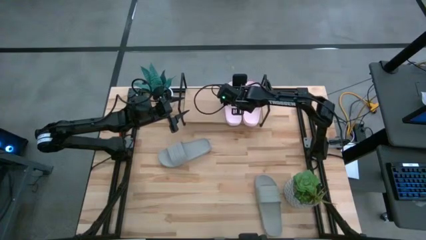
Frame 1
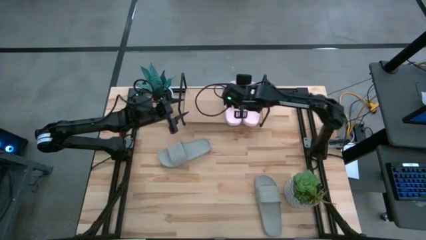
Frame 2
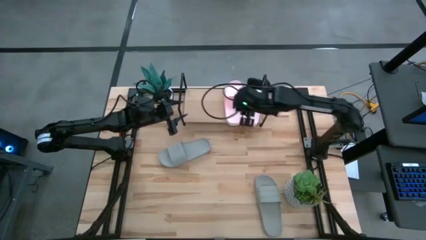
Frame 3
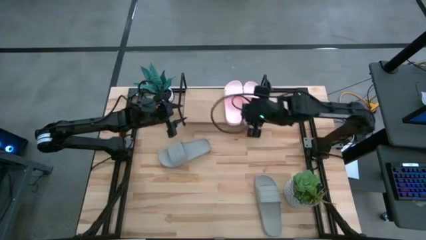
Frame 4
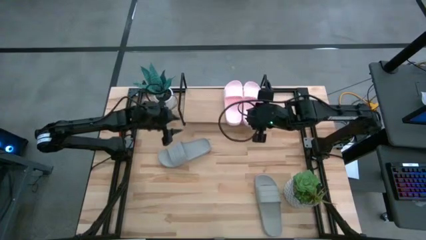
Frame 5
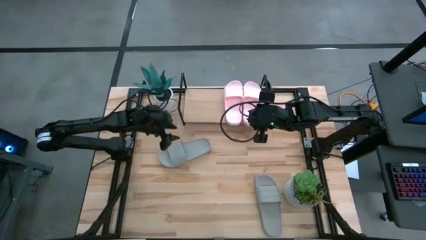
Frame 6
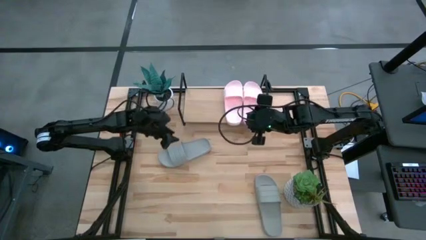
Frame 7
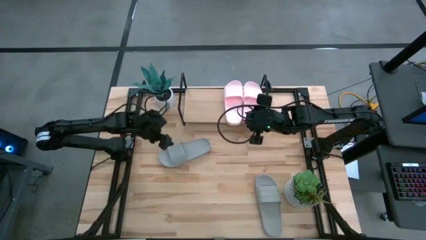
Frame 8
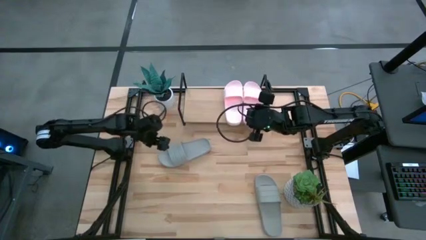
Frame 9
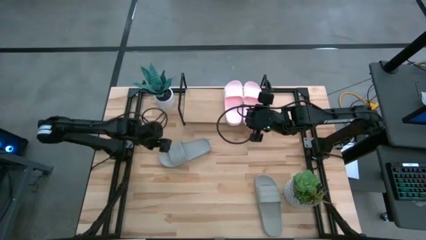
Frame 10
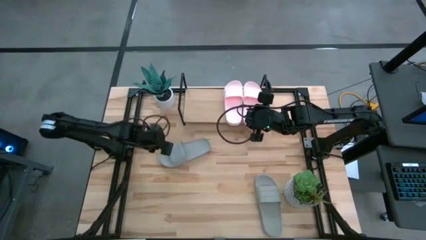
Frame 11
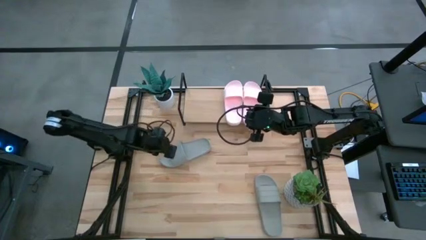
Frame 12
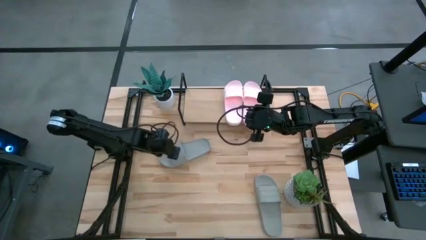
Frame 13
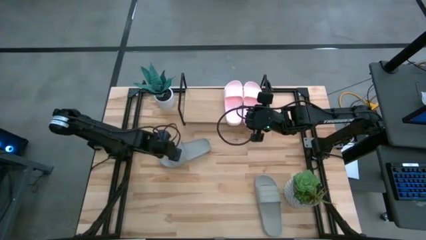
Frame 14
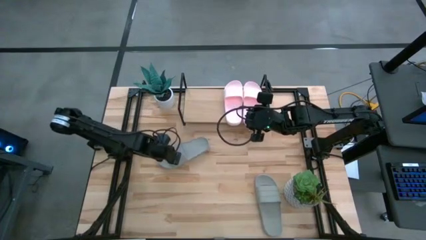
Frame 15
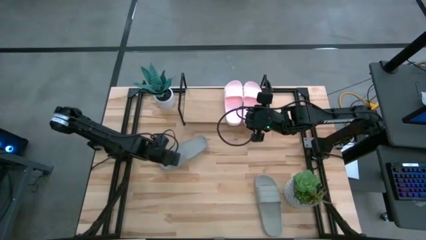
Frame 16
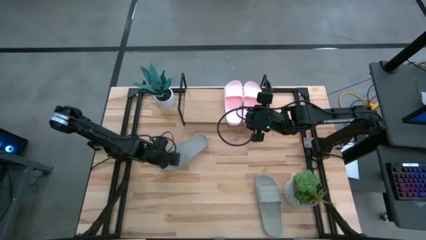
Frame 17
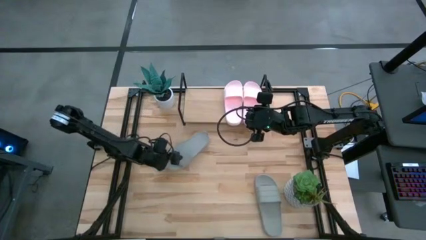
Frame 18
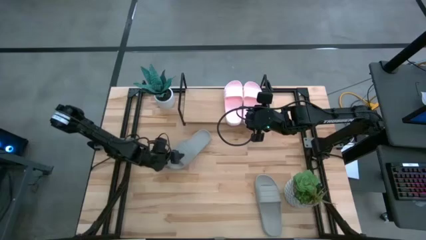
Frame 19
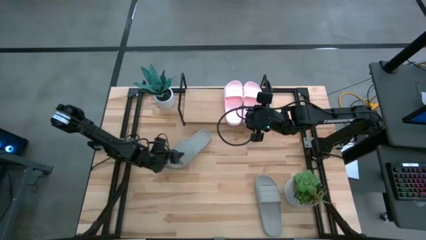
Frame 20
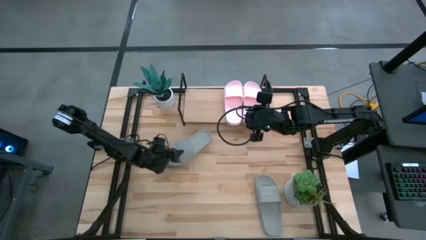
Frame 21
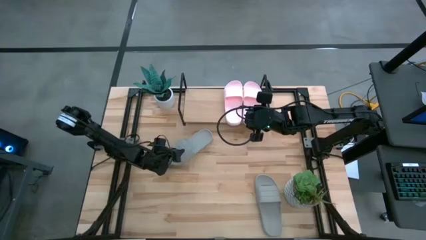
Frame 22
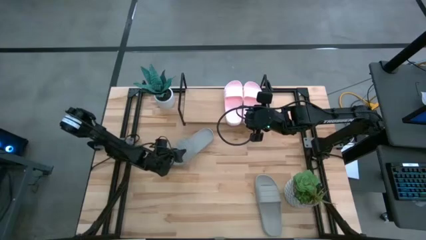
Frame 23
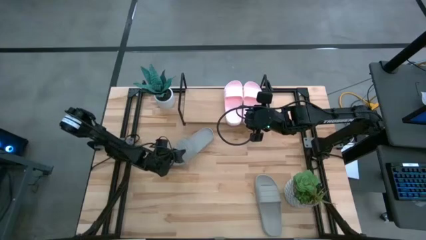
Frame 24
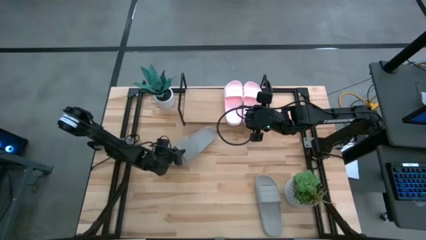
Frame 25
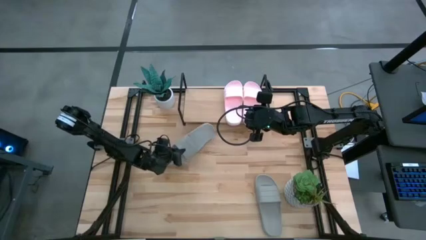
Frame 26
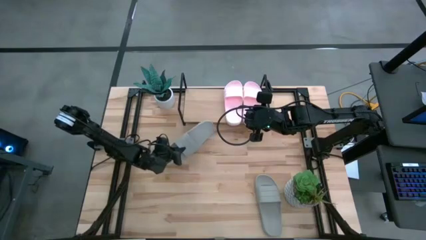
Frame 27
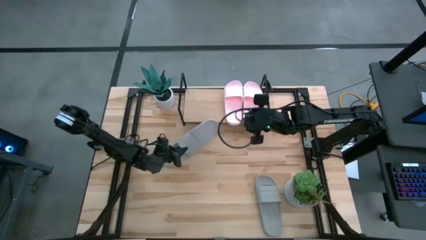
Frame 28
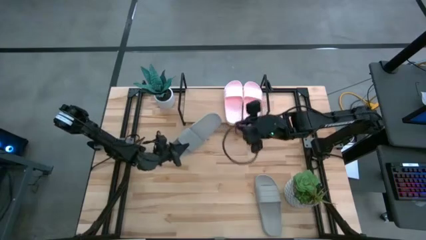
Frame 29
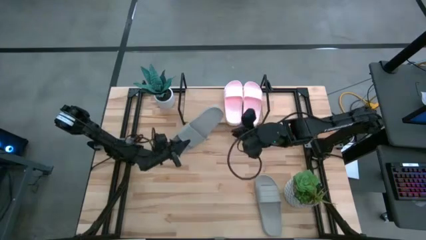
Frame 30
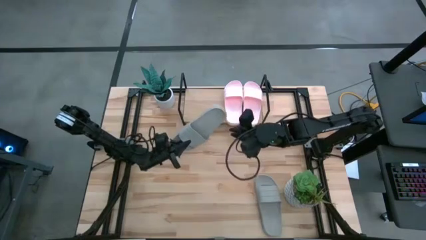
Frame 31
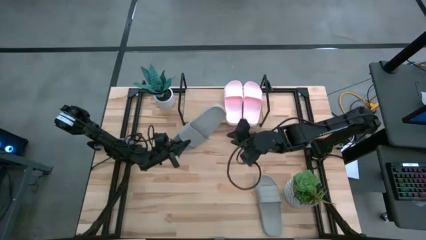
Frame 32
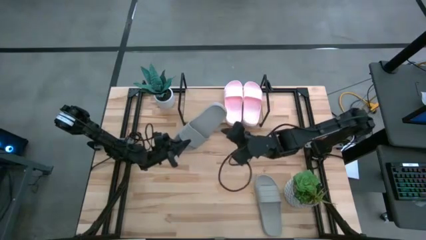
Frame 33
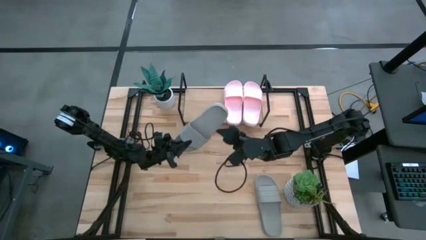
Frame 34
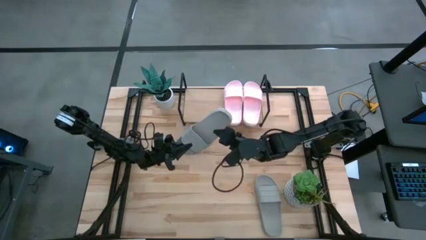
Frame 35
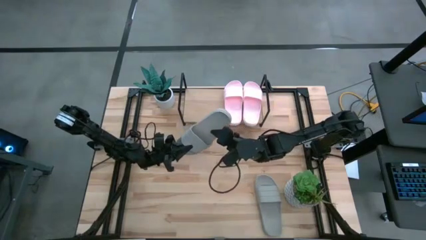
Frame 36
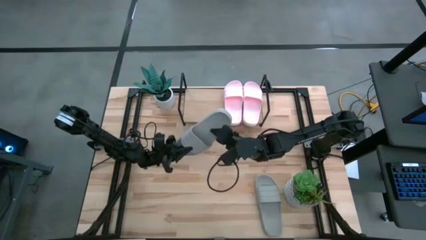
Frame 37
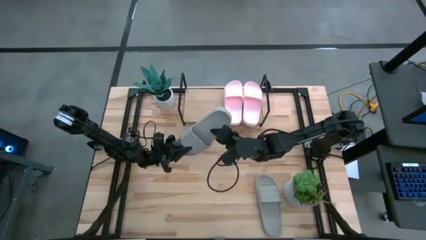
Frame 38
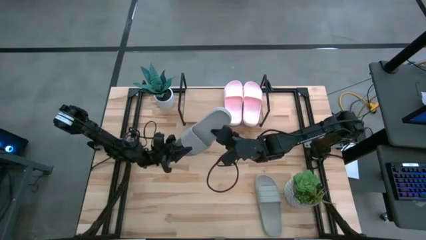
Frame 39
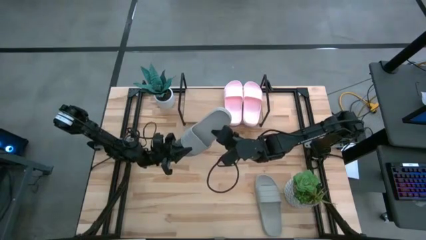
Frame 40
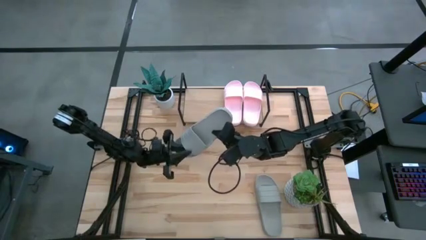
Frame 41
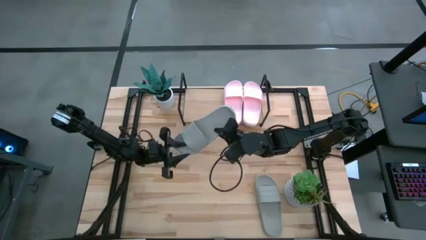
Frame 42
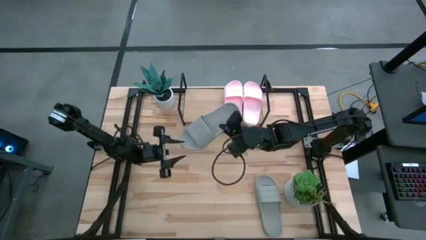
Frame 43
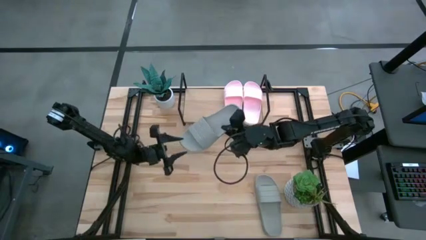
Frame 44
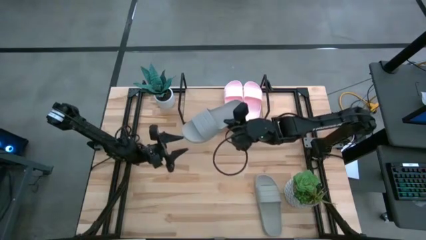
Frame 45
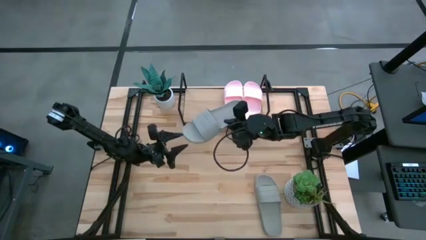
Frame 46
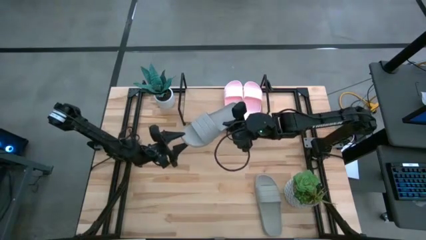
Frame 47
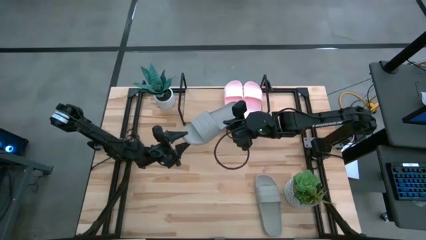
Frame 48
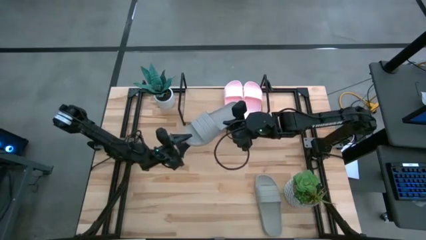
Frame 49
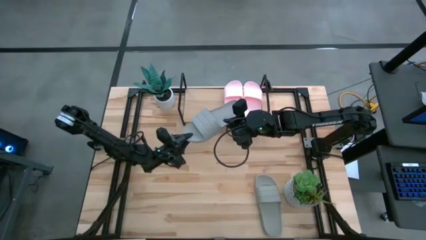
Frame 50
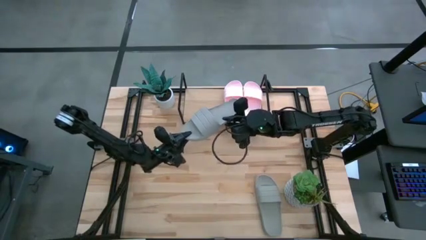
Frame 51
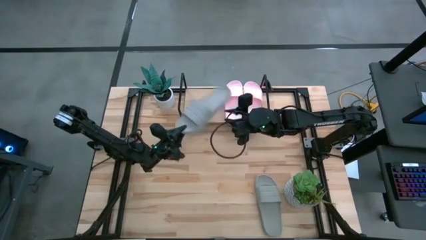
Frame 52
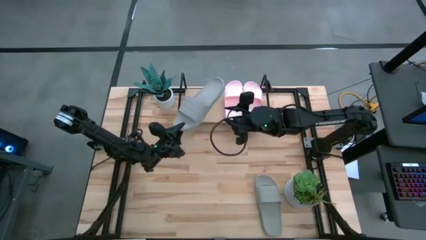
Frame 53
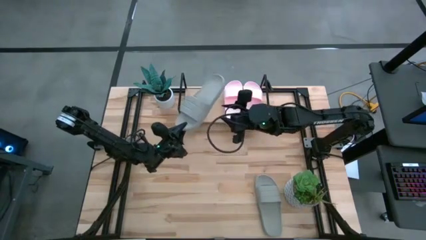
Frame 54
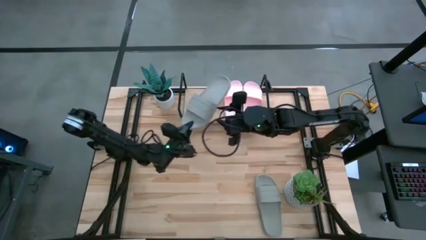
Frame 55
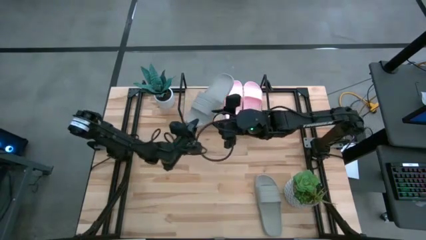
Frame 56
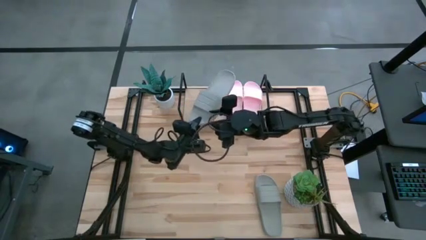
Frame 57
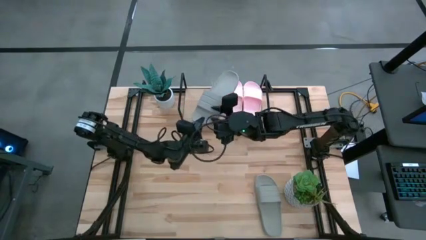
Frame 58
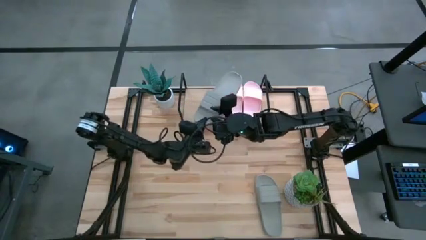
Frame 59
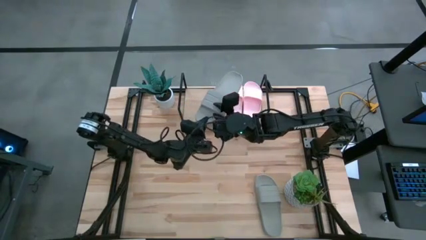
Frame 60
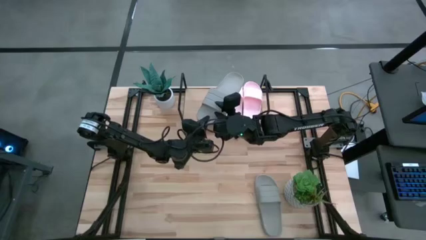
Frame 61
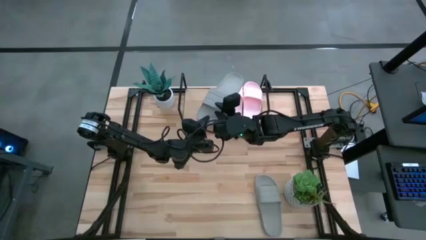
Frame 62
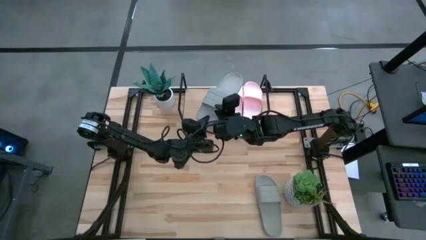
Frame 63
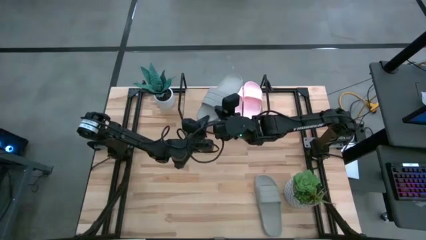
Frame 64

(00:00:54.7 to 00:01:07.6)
Task: Pick and place slides into the shelf
Put the top gray slide on the shelf

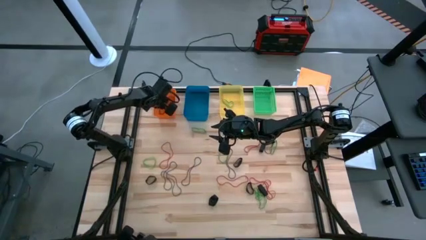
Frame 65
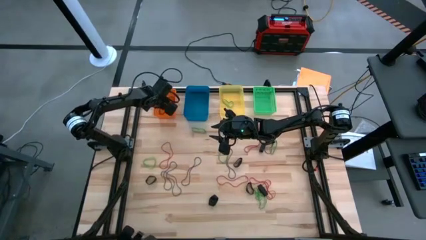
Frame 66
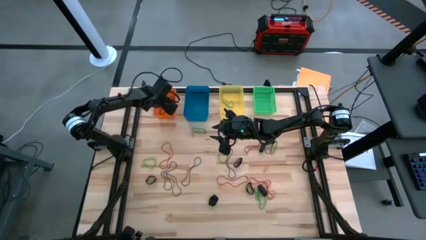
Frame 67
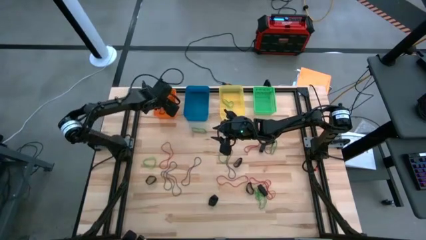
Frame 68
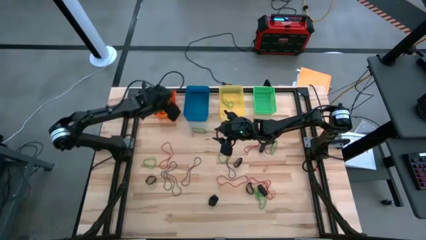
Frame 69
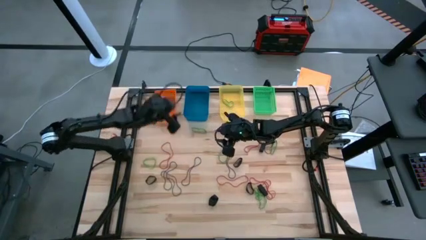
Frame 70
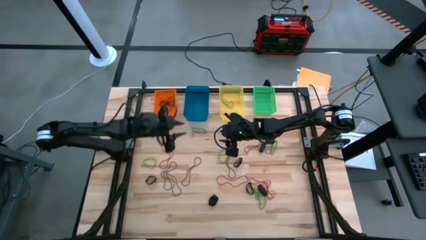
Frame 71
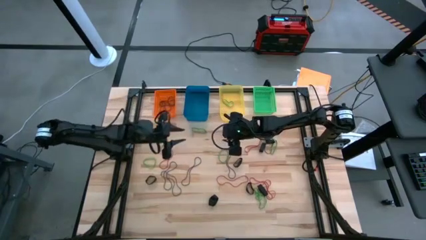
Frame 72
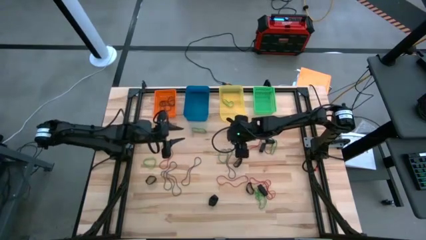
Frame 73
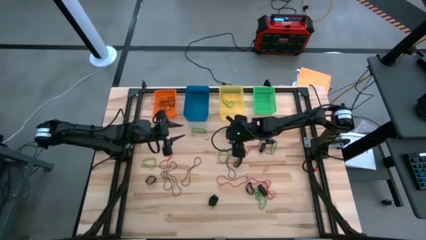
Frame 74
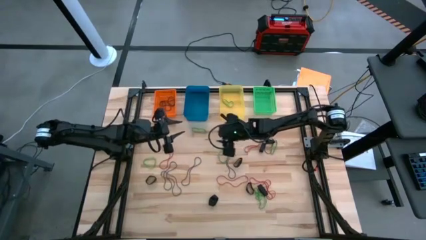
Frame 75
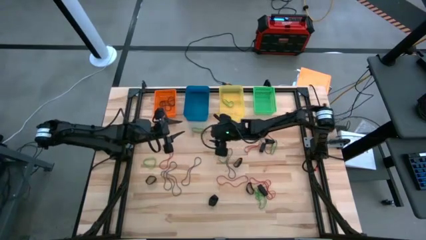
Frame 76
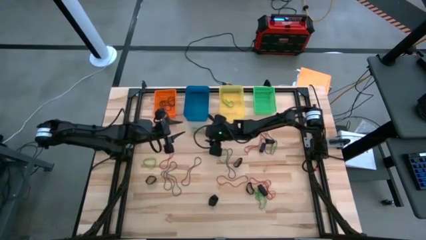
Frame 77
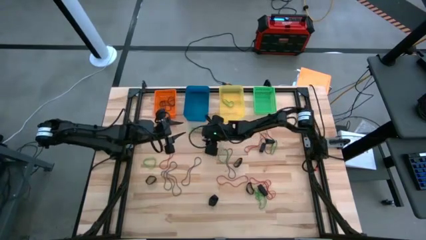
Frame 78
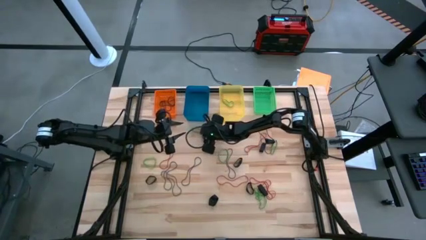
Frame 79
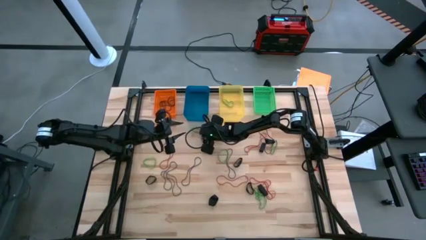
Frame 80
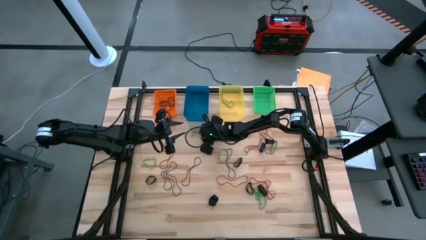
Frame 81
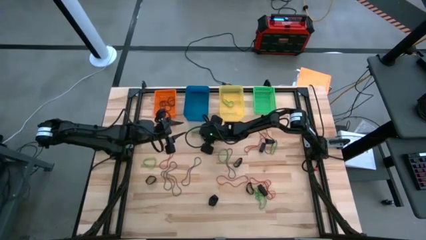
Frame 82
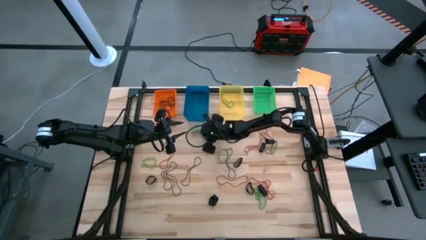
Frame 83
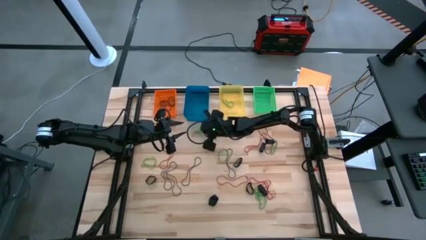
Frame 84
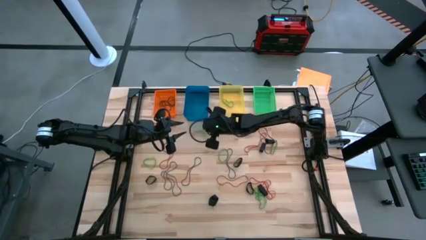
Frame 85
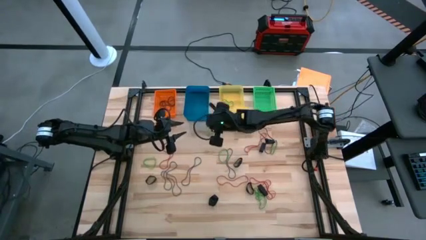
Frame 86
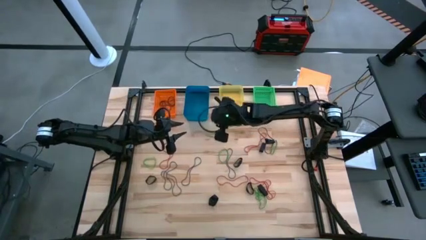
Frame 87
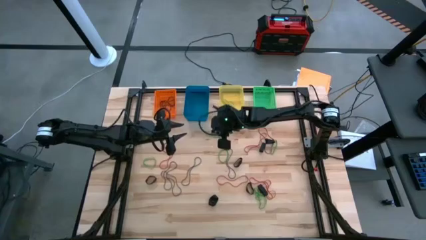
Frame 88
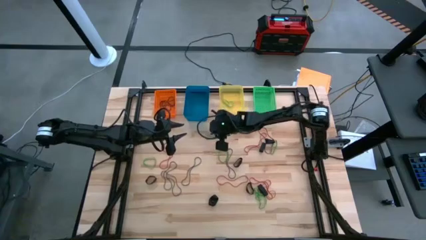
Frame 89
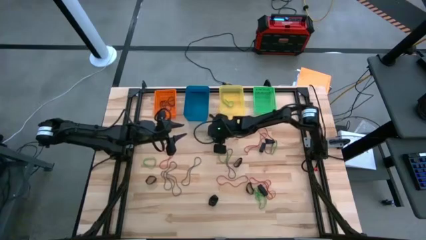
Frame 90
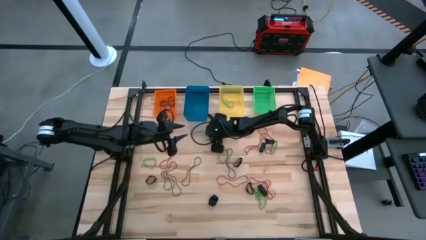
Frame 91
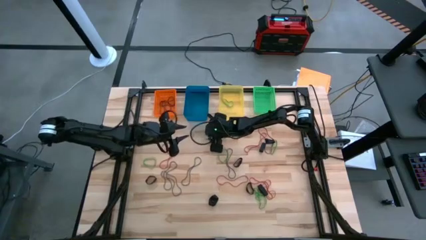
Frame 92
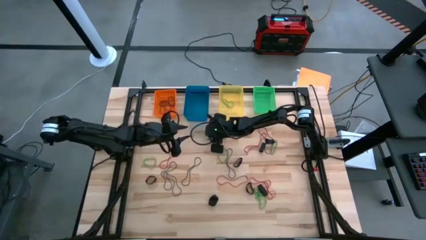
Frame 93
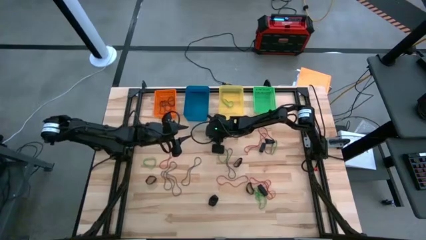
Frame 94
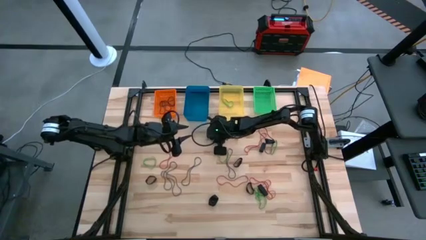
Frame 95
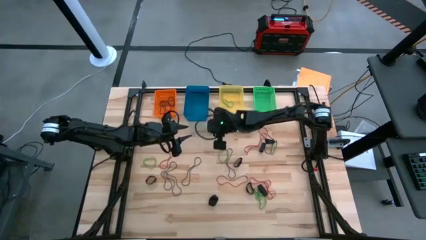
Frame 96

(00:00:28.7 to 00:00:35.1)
Task: Sort rubber bands into baskets
Put the green rubber band into the yellow bin
